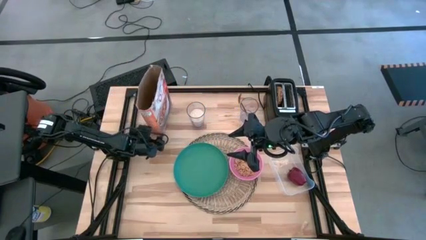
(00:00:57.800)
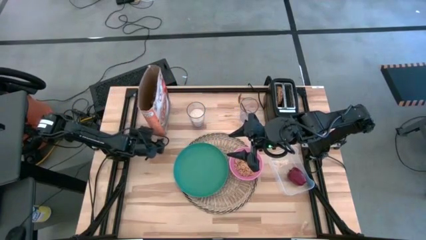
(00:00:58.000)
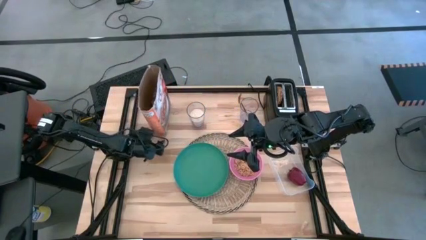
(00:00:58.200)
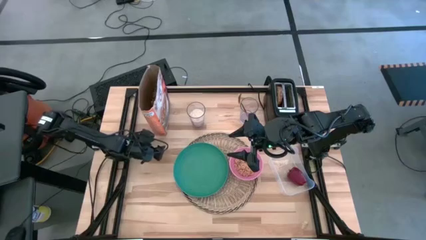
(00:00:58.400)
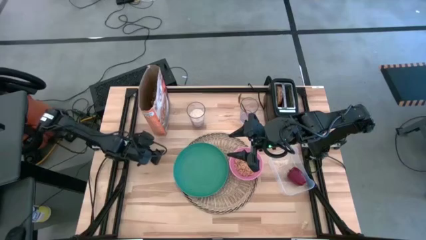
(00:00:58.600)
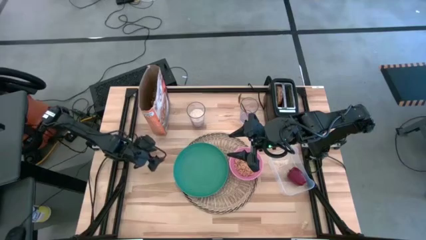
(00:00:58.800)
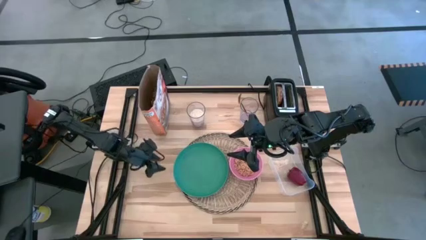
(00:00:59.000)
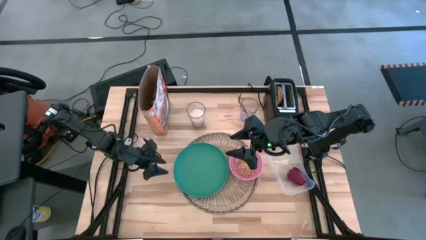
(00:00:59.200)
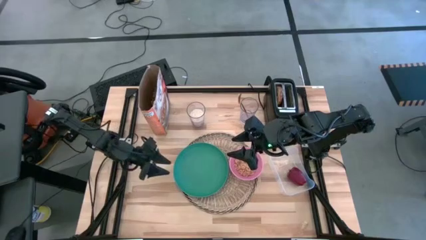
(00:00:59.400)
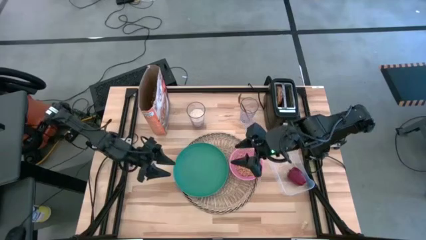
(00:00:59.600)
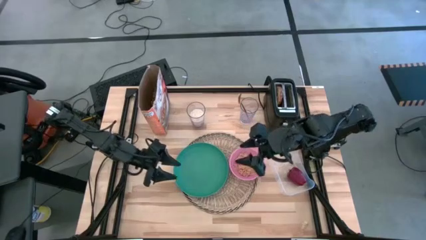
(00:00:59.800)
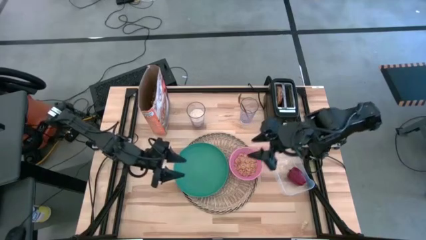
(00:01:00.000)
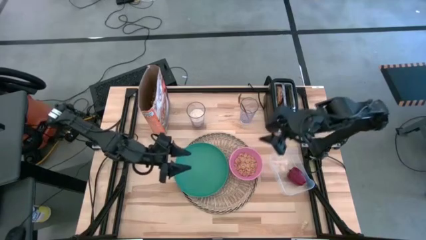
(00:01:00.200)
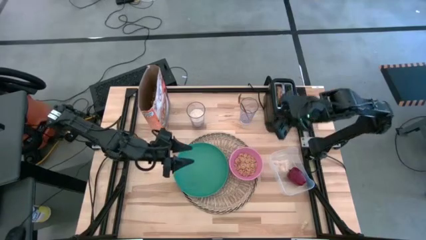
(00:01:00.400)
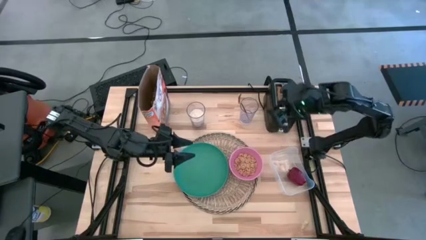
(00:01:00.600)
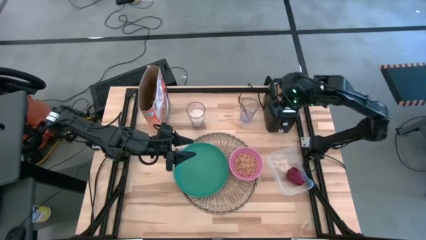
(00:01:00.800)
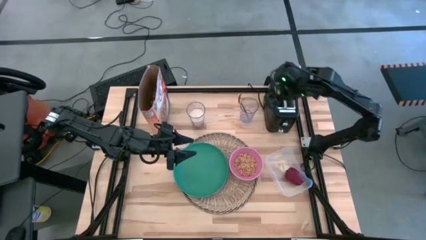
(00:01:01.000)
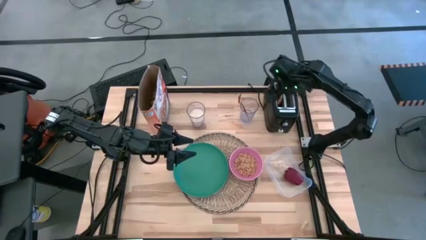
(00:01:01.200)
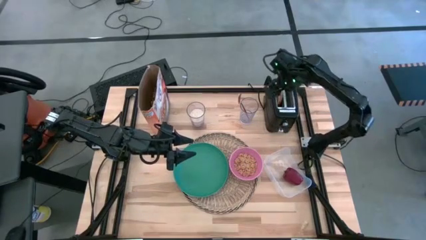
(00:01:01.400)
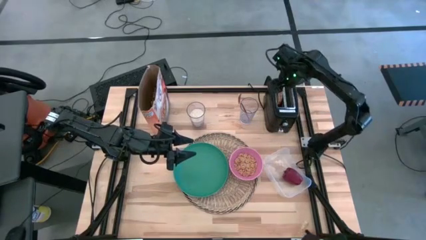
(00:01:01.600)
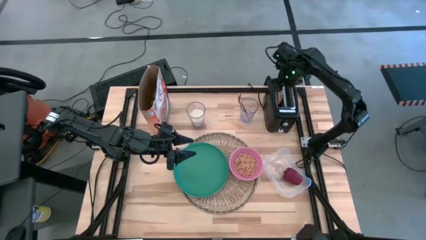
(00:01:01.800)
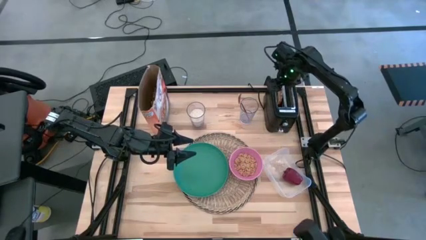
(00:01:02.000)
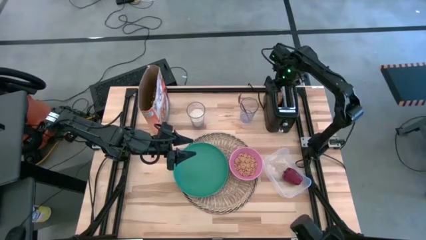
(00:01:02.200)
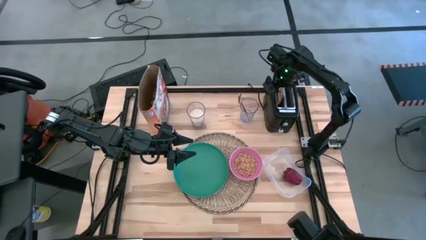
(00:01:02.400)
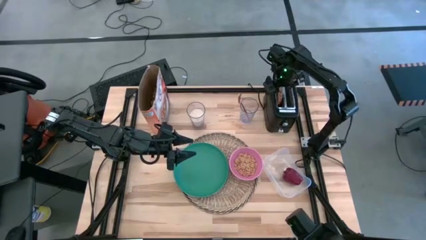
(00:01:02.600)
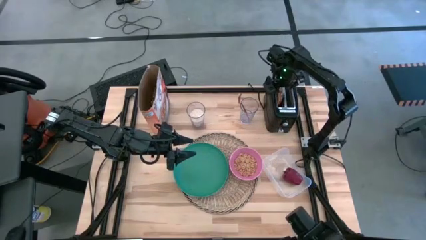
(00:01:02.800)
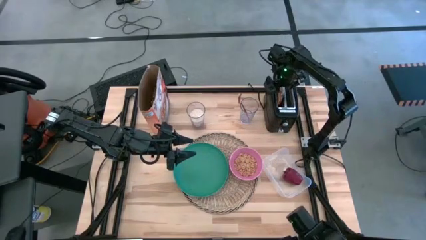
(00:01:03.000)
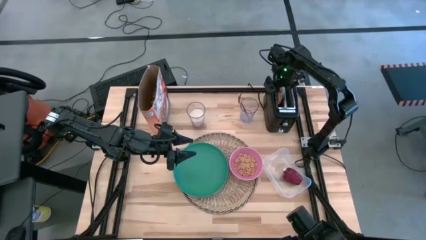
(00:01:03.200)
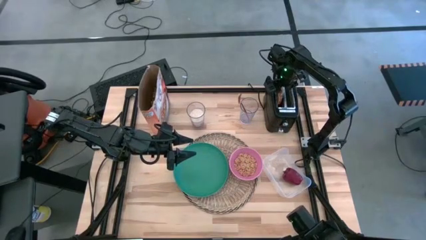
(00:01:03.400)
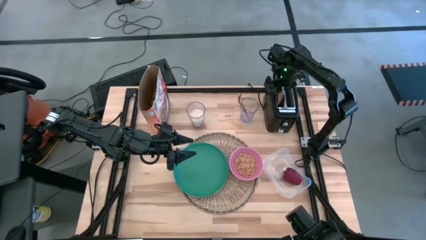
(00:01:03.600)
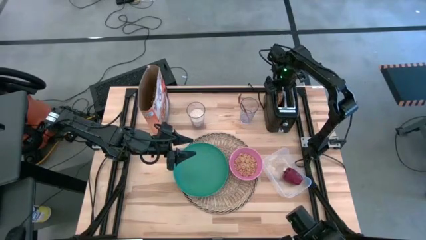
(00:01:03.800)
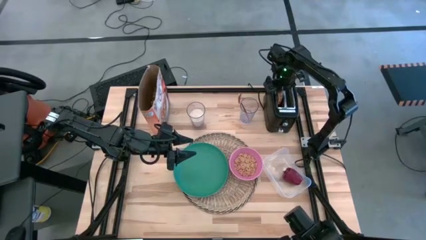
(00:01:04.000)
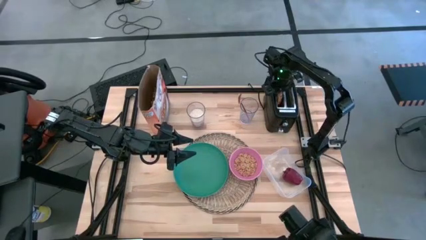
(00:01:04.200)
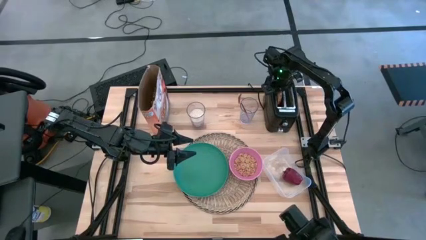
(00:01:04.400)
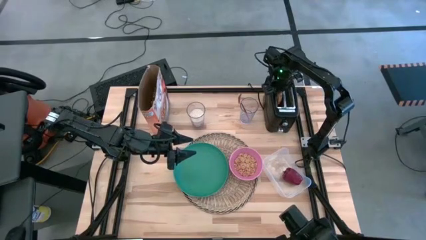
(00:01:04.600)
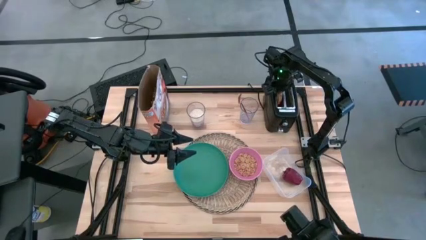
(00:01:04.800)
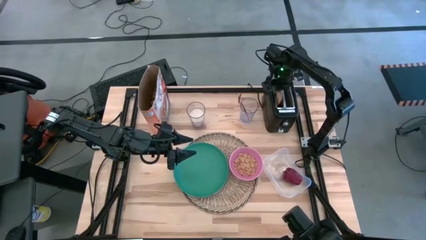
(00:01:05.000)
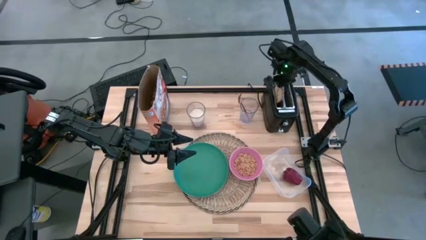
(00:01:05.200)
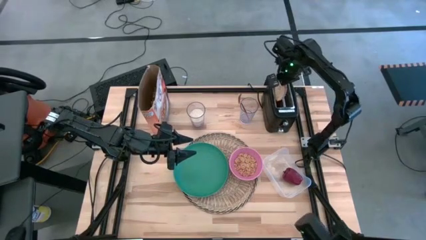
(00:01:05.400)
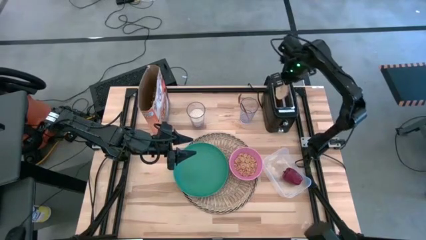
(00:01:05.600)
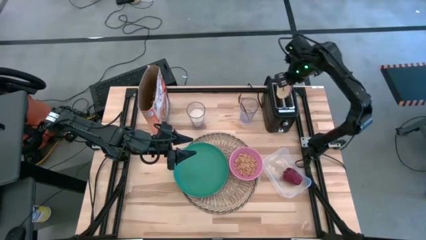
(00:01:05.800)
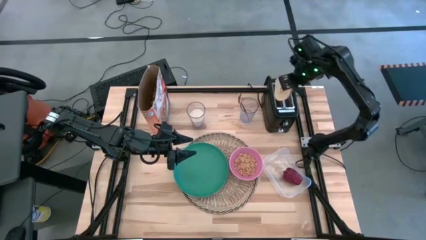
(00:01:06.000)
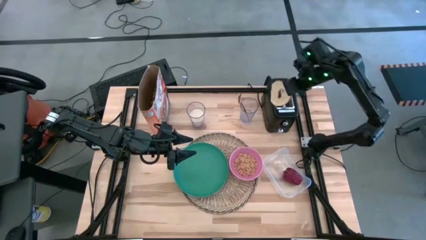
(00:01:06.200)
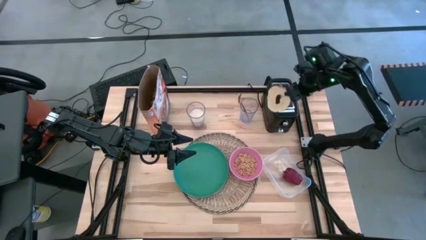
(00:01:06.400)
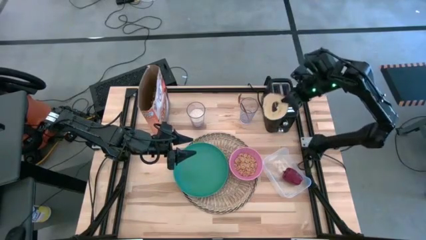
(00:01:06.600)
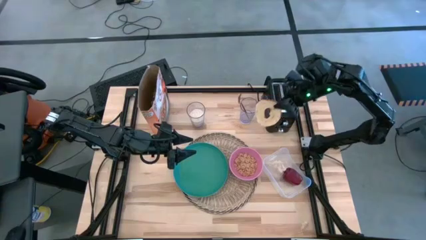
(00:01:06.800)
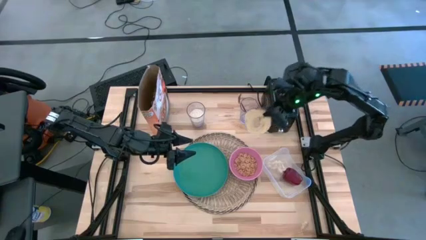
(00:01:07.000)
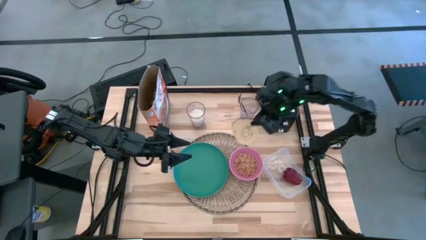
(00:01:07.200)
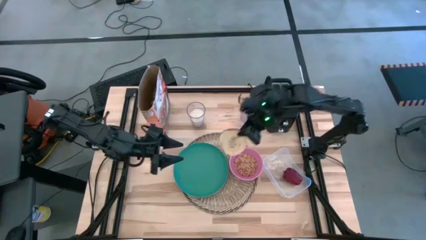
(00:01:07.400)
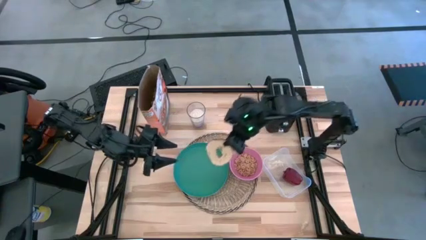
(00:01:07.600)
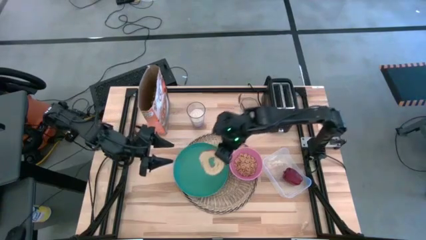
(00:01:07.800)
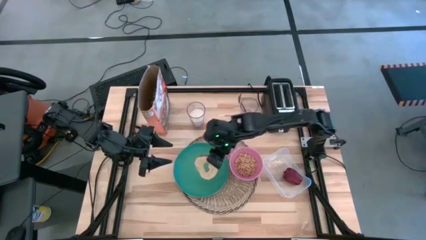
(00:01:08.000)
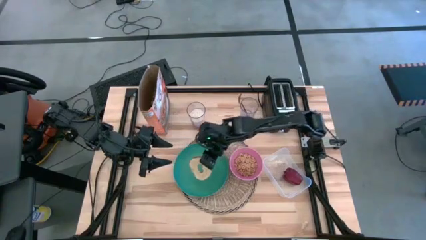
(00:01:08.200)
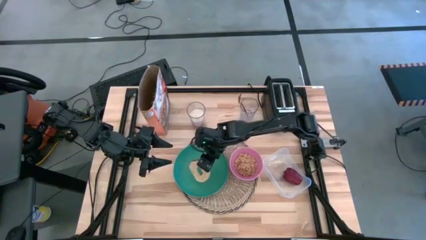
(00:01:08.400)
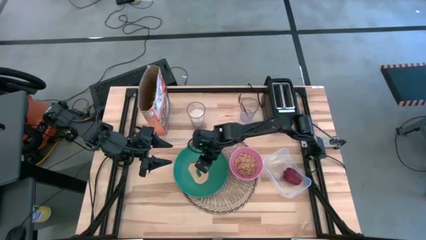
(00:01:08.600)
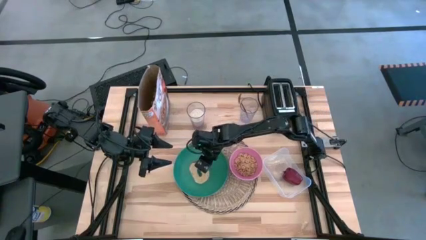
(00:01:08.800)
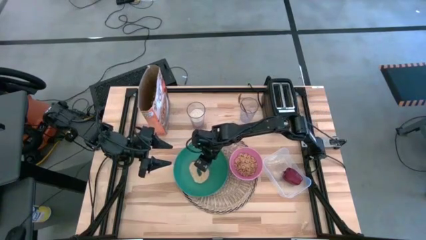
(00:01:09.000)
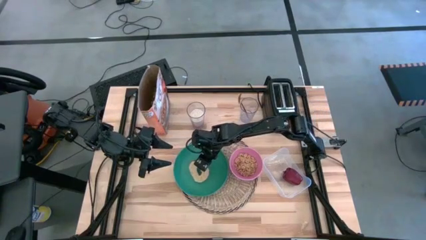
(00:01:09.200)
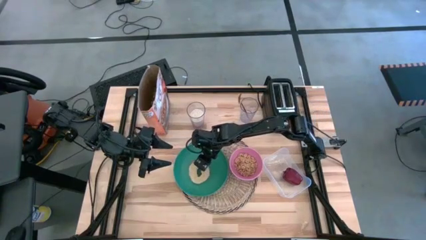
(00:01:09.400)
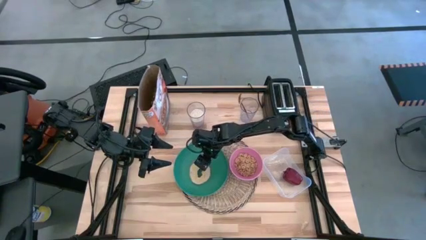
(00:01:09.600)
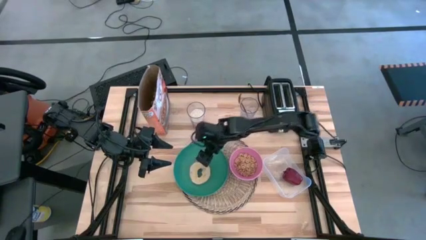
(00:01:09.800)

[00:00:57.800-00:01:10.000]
Task: Arrange a breakfast setting
Put the toasted bagel on the green plate

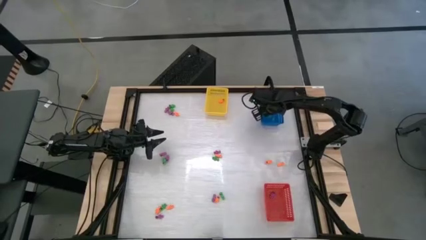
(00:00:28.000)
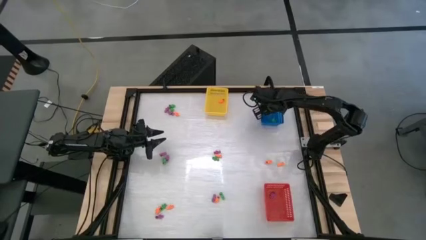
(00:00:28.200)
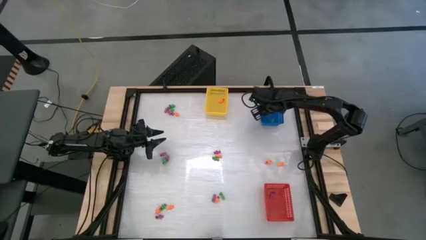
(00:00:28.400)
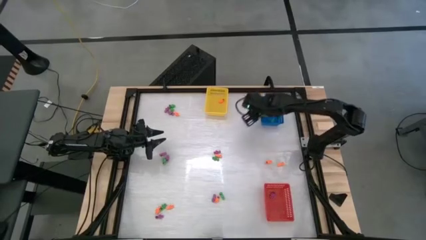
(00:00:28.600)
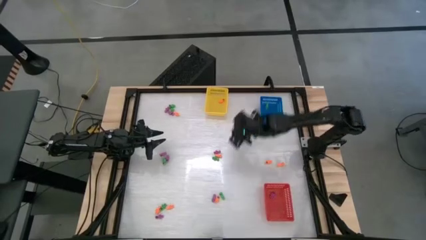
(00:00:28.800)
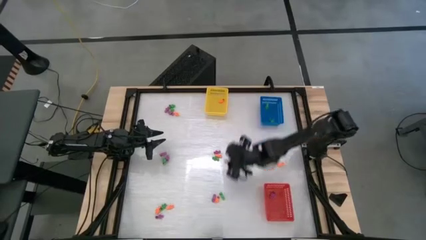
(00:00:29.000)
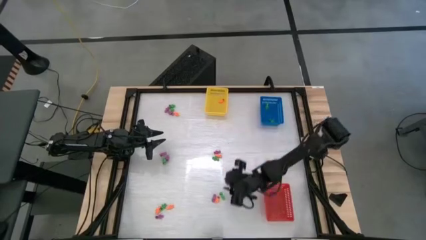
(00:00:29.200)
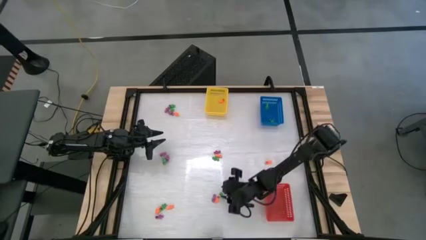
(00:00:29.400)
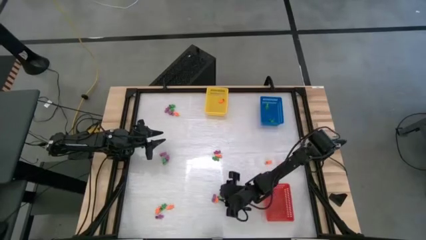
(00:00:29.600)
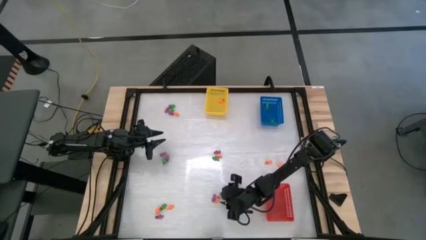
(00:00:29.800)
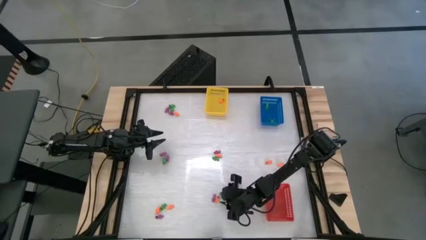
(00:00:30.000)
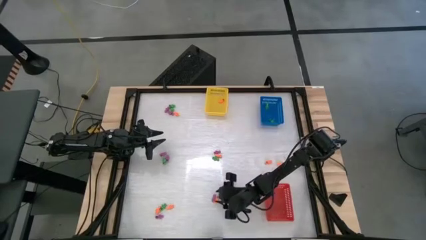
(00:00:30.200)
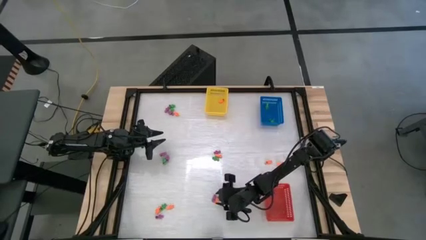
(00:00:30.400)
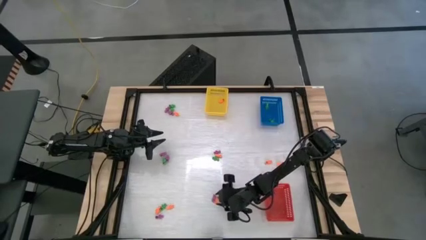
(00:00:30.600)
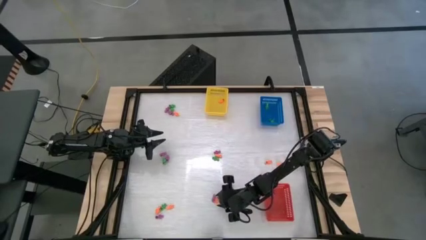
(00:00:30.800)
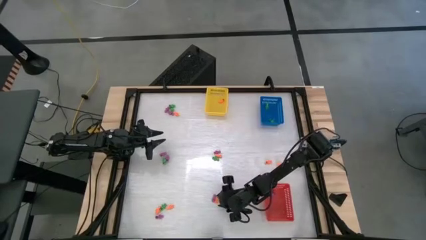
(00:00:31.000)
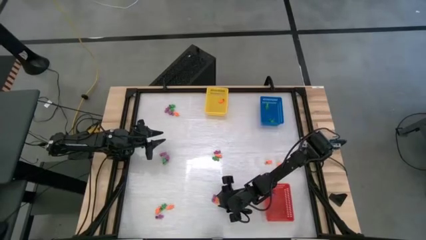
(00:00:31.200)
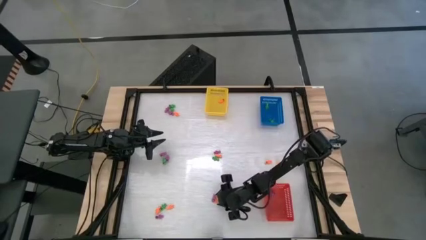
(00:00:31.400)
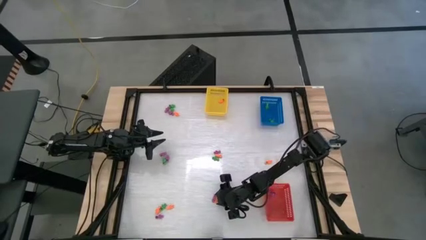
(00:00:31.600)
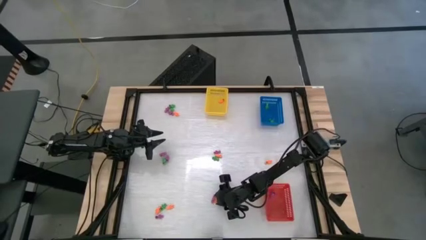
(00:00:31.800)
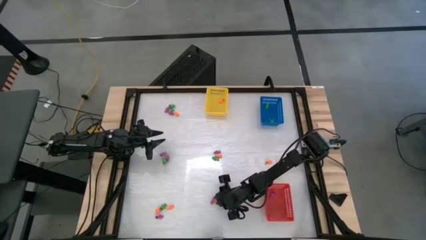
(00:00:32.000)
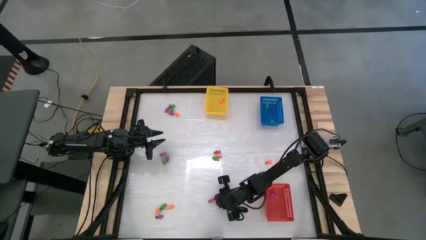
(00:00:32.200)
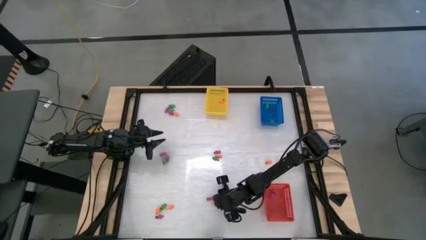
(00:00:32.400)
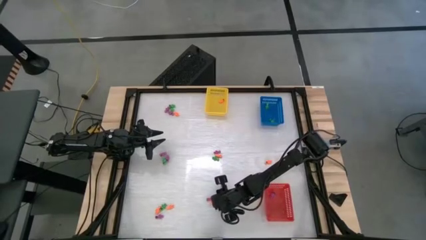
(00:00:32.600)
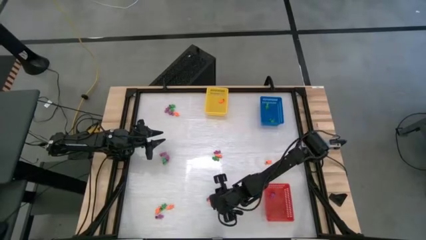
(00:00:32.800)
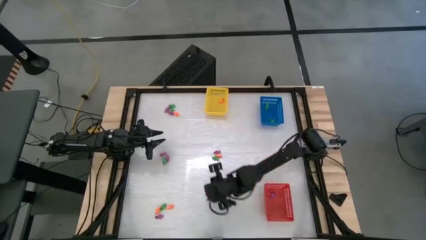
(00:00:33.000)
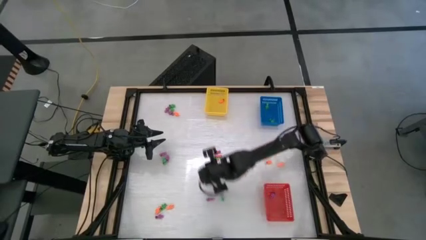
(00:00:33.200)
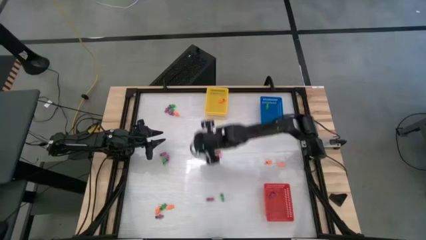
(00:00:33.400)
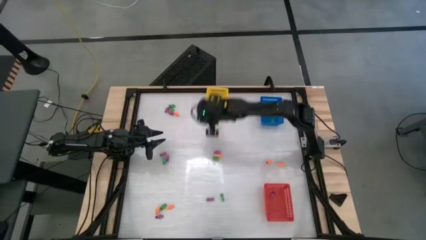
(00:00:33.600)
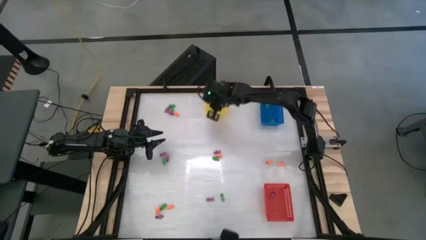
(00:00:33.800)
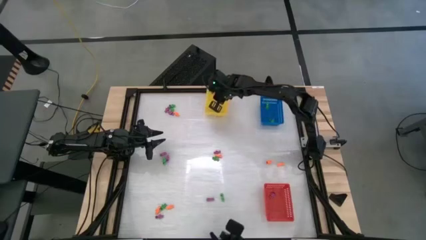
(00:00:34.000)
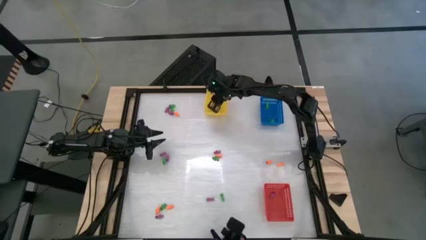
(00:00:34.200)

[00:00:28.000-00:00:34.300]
Task: Sort Halloween decoration
Put the orange skeleton toy into the yellow bin
